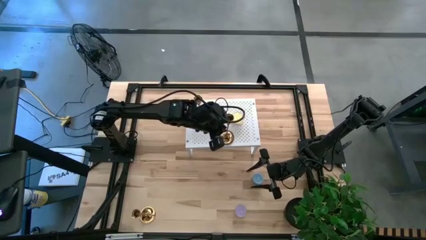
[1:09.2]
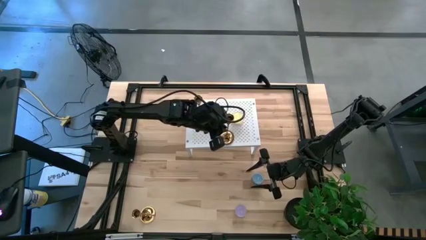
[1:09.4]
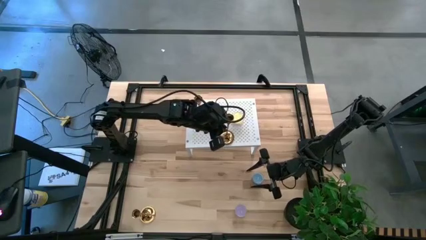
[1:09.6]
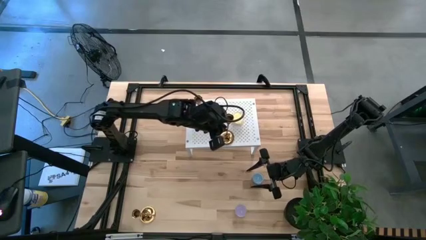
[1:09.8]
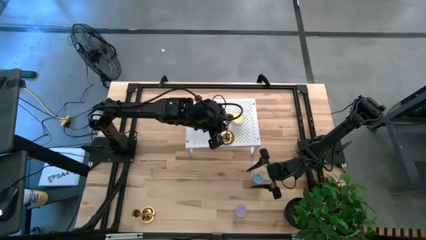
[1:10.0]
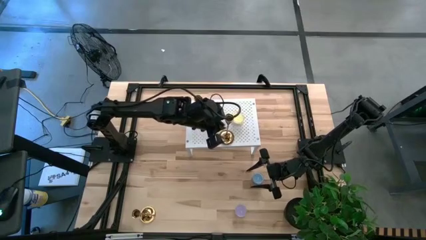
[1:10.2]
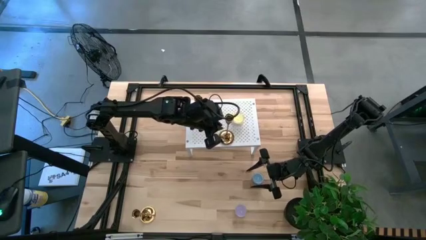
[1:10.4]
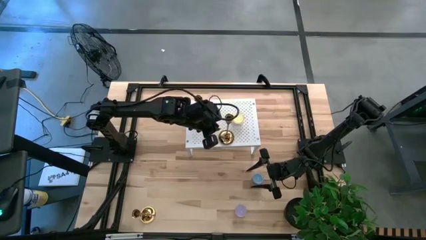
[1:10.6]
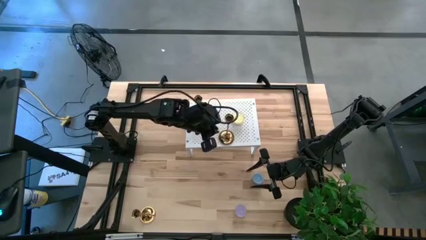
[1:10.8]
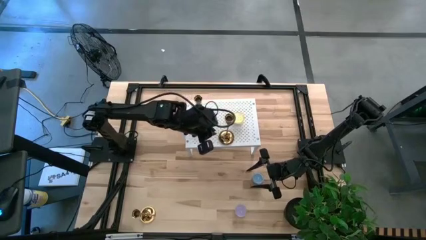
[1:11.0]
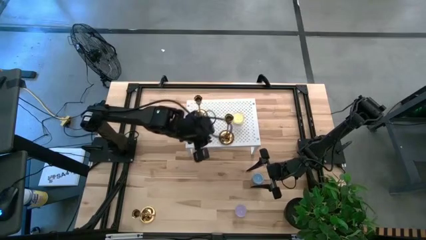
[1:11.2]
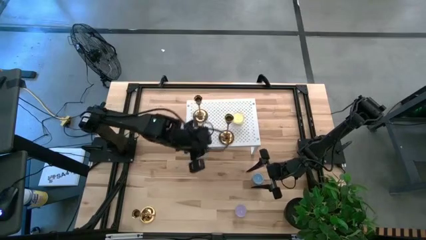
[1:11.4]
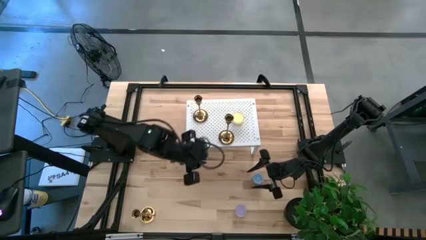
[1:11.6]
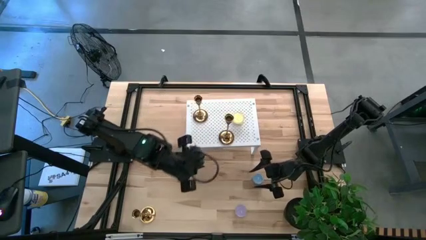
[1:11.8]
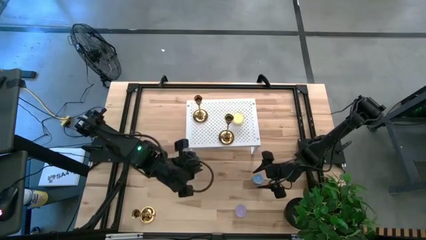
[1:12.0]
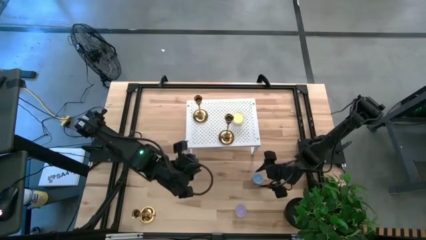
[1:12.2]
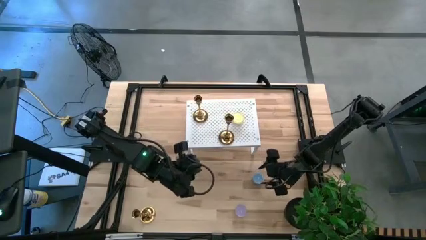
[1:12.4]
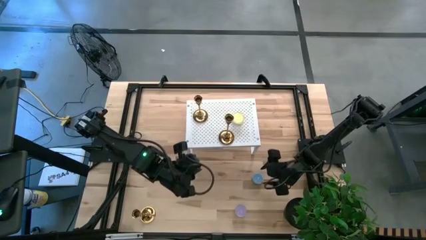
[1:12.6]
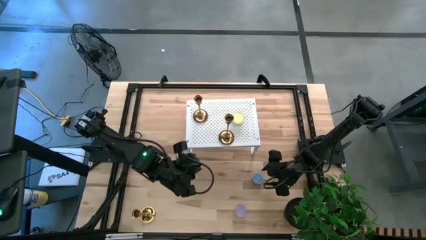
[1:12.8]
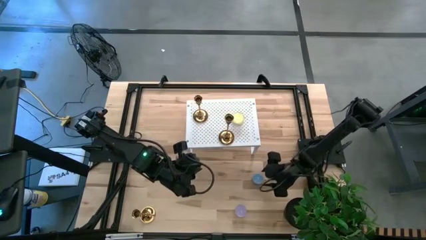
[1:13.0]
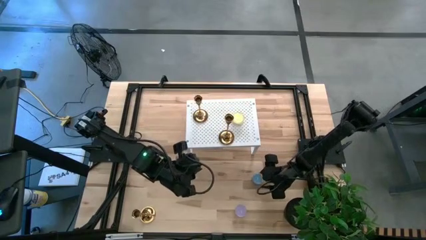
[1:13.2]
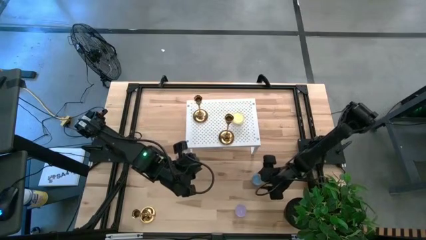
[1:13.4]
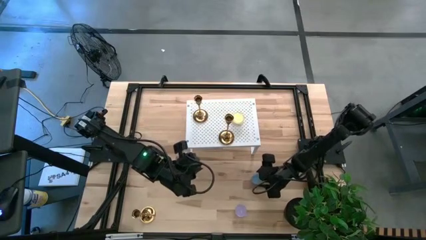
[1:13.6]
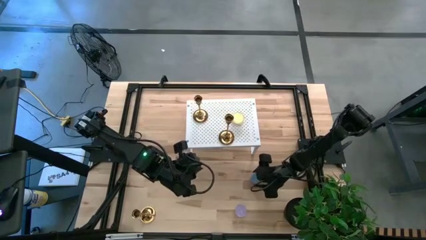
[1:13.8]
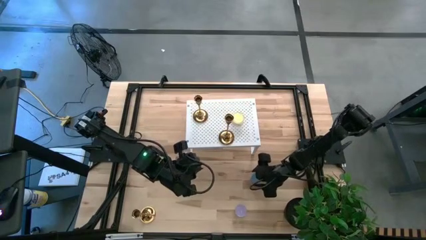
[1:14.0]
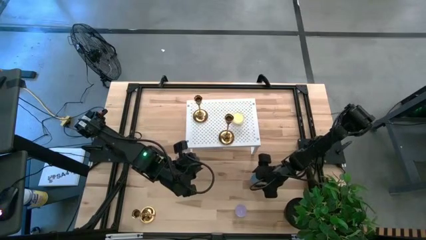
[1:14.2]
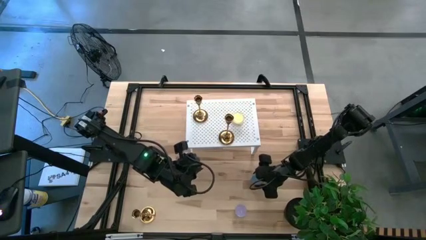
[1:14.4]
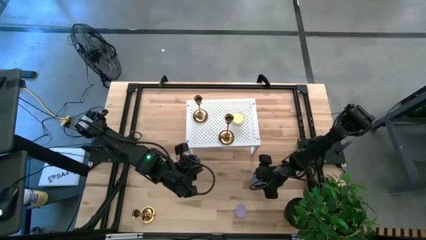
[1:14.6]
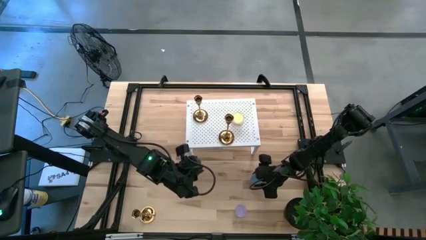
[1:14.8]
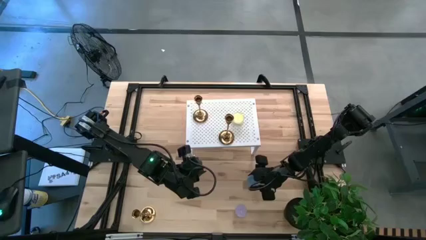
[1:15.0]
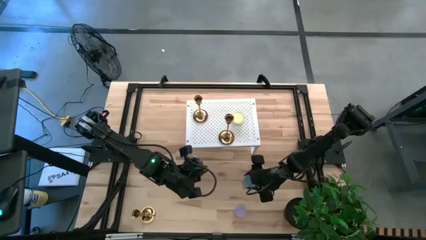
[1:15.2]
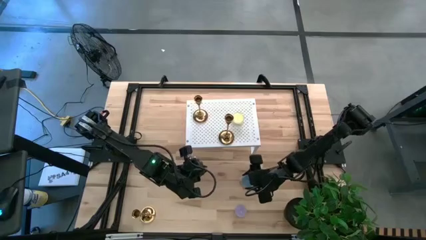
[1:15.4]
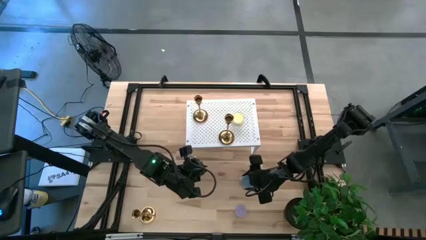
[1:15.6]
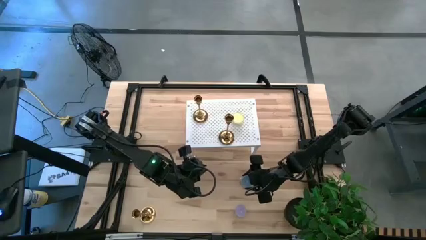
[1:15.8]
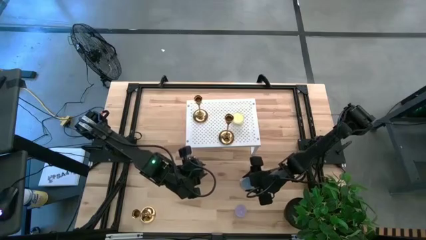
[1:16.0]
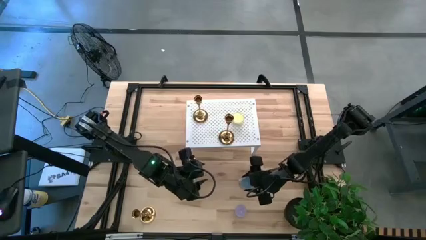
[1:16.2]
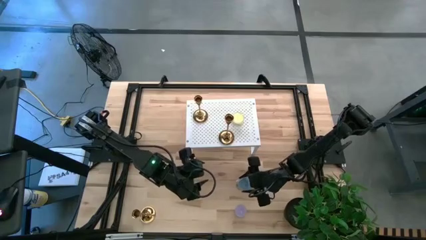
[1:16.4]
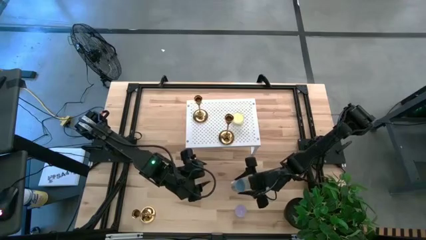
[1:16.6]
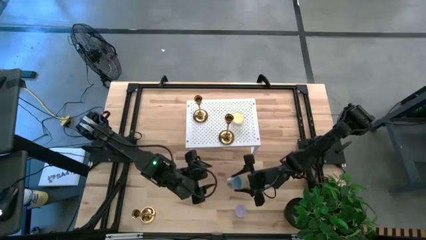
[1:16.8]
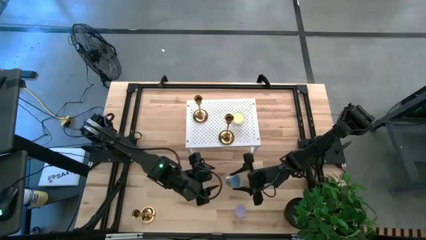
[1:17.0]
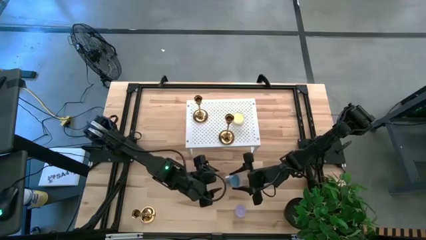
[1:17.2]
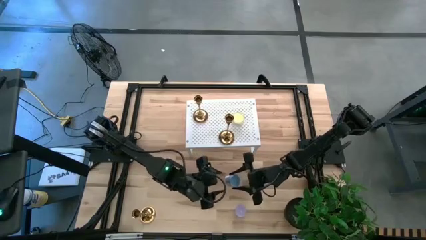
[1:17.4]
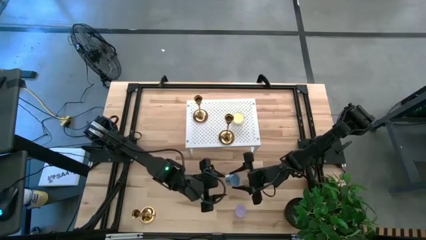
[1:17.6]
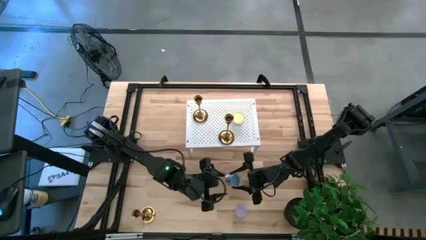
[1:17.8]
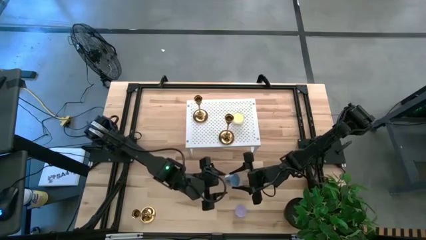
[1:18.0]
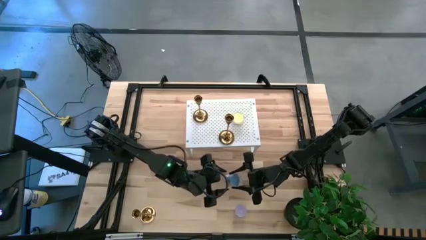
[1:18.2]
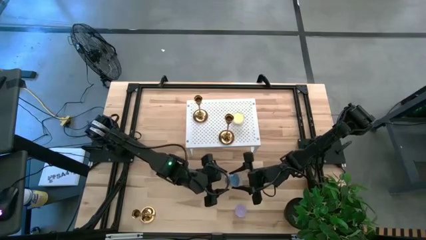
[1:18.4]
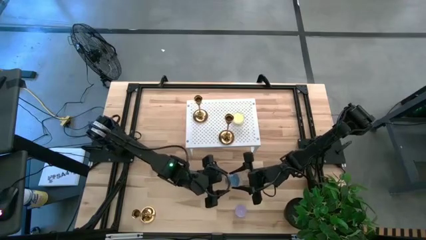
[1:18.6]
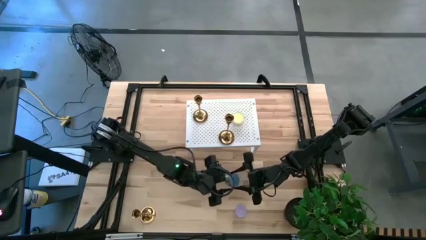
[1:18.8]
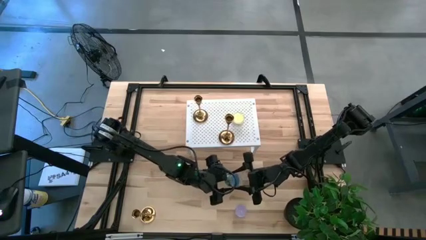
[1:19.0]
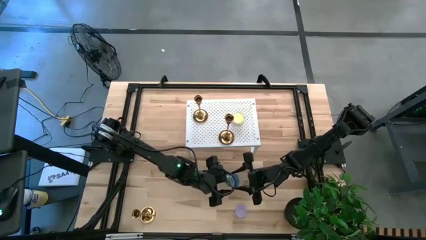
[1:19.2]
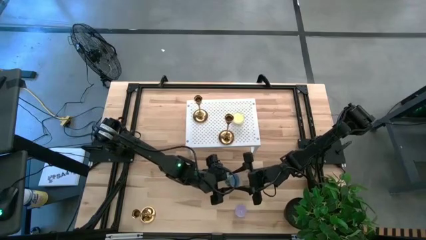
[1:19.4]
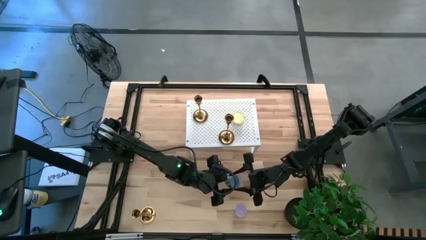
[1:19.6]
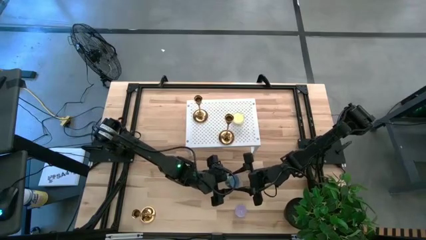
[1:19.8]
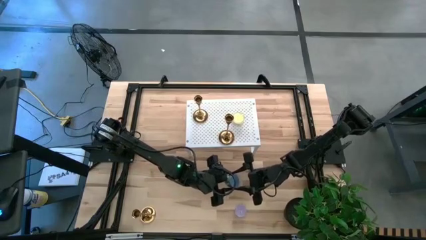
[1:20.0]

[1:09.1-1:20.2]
Task: Pick & Place candle stick holders
Put the blue scented candle on the shelf
